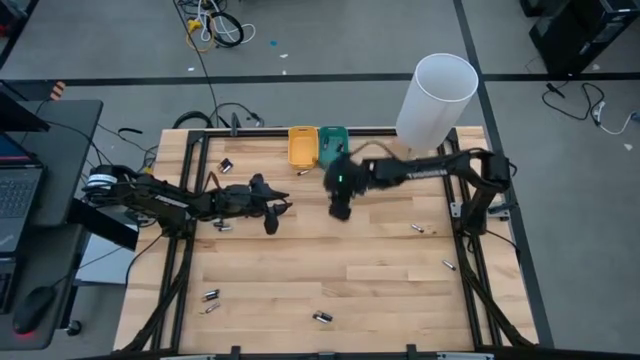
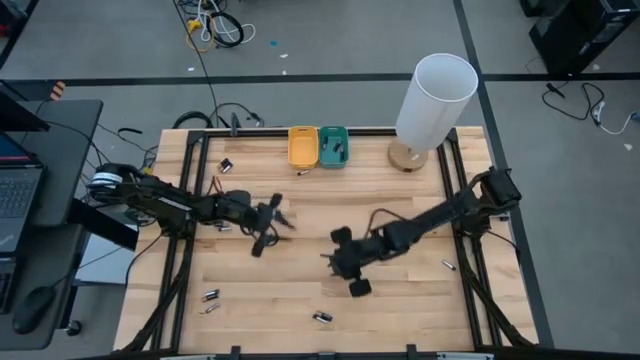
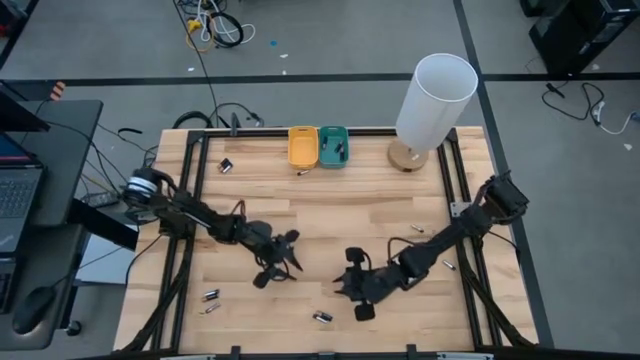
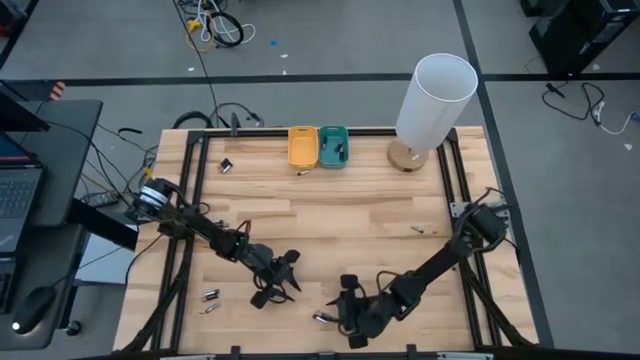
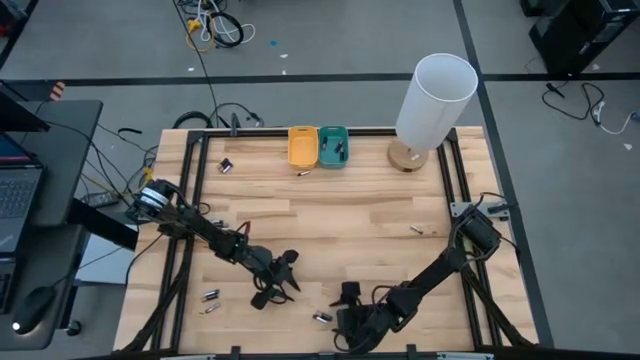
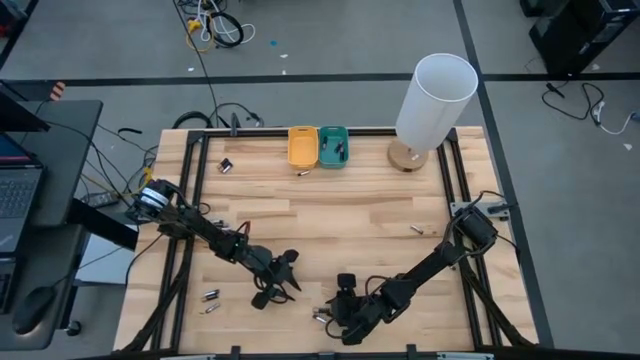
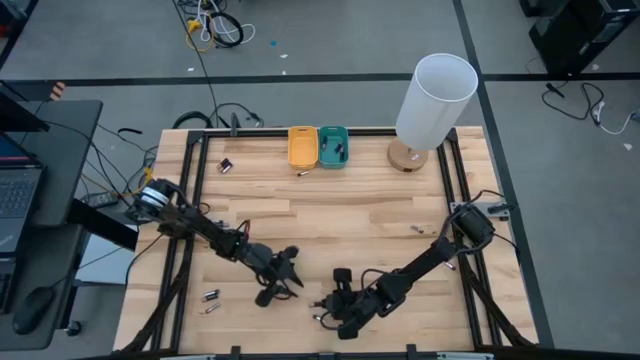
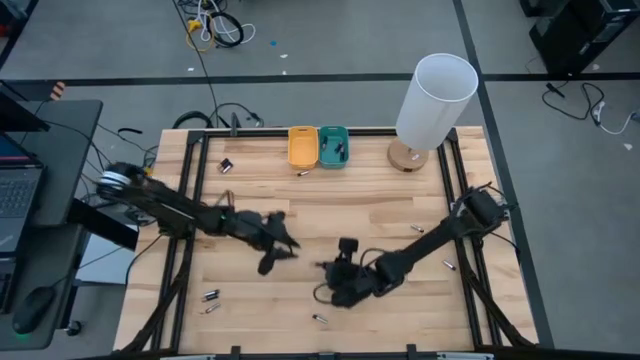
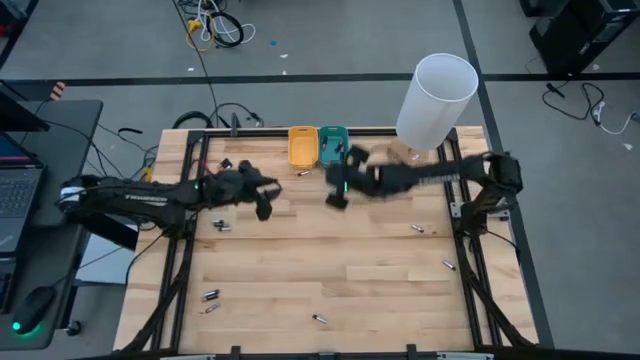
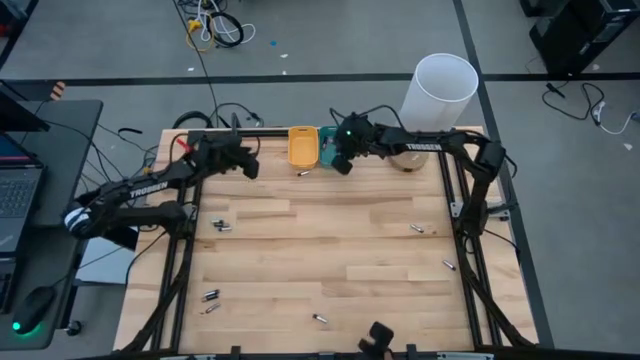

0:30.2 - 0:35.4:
Task: Sort batteries
Put the black battery into the green bin

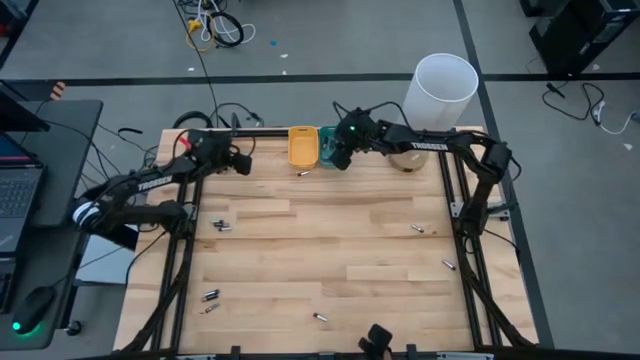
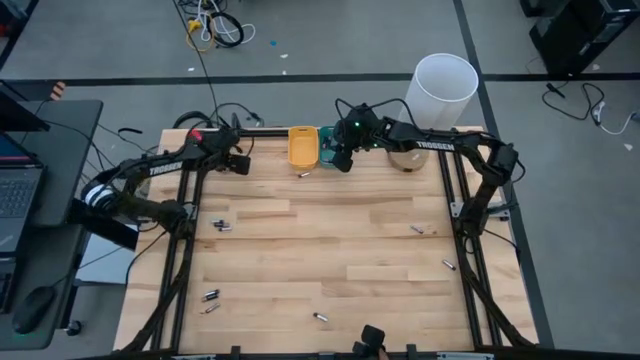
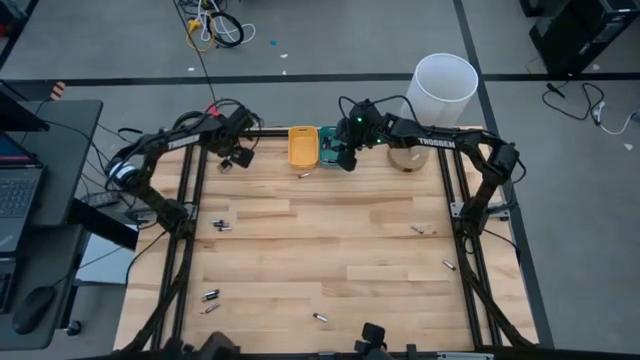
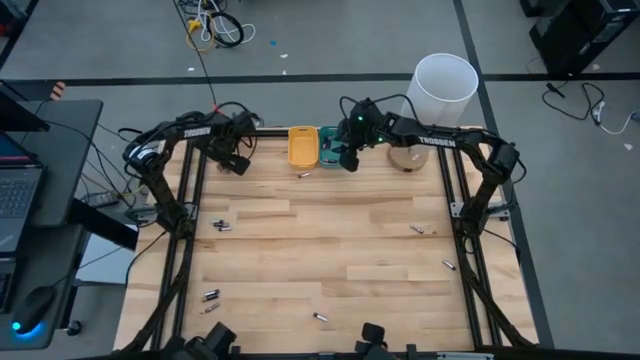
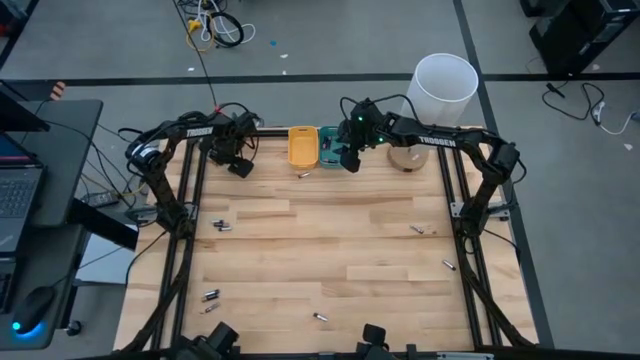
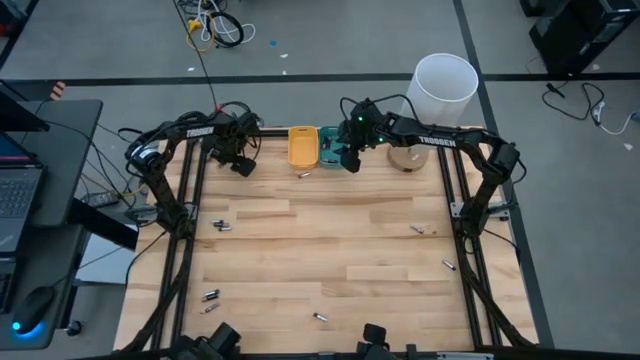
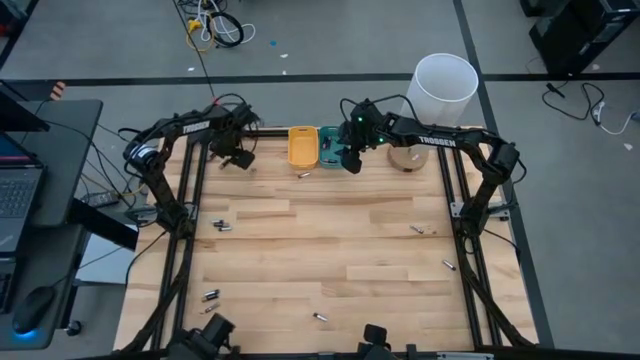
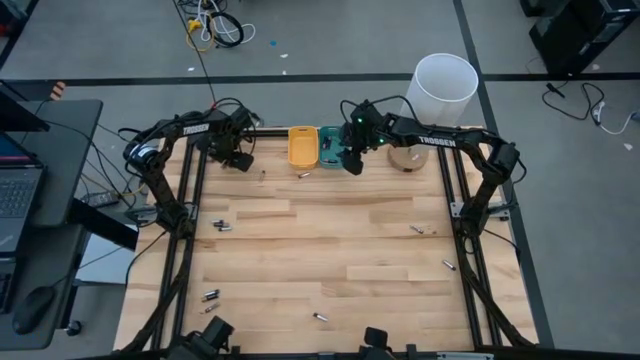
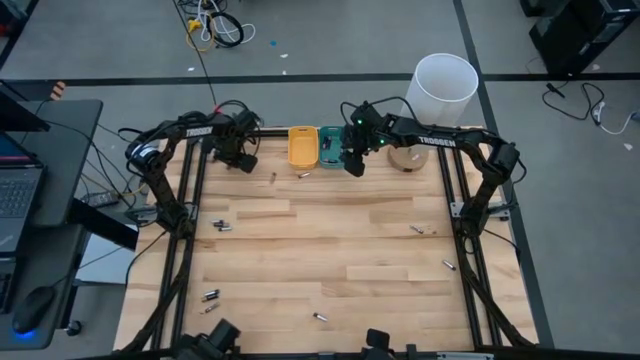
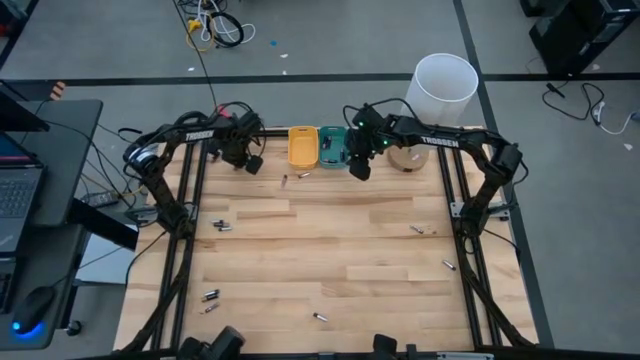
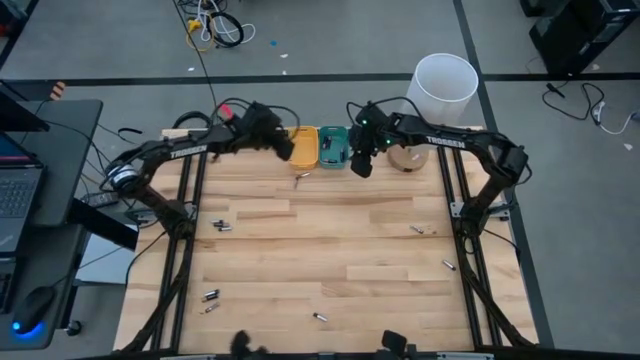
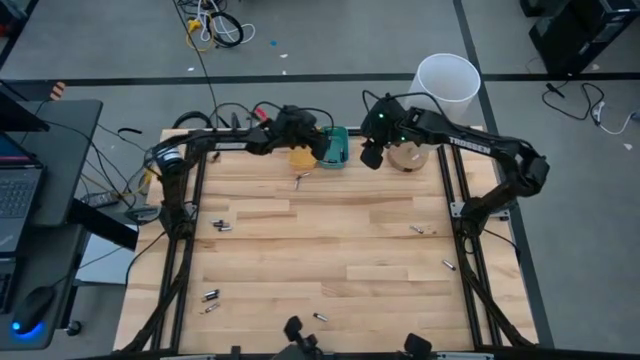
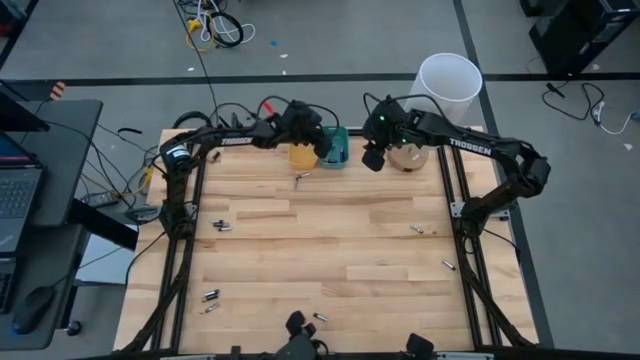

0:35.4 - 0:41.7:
Put the black battery into the green bin

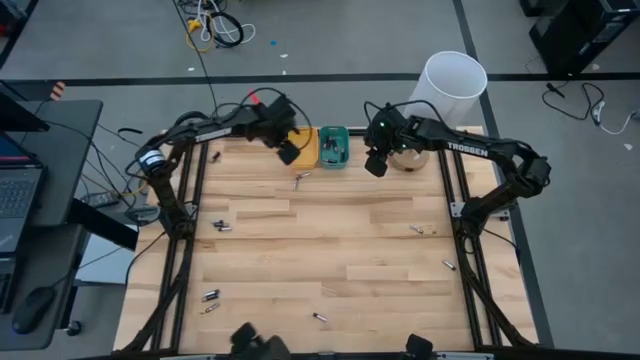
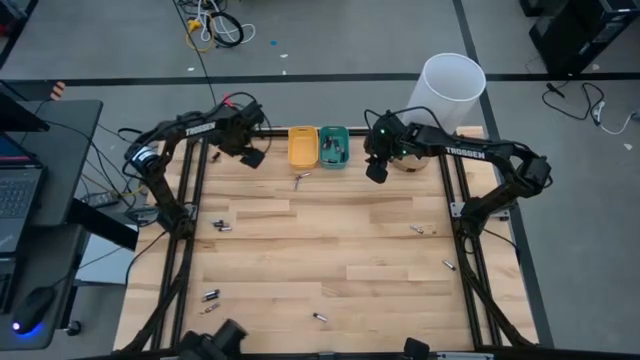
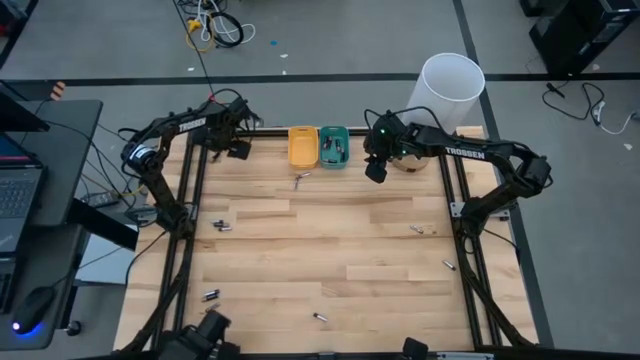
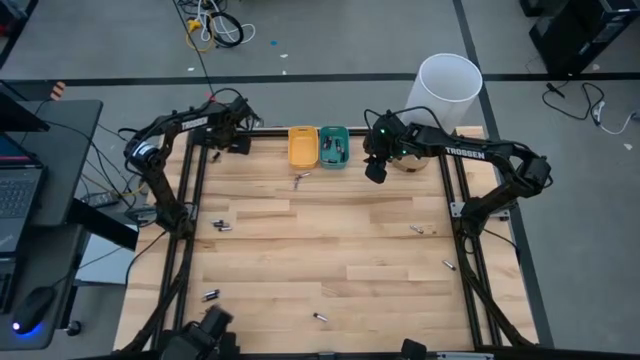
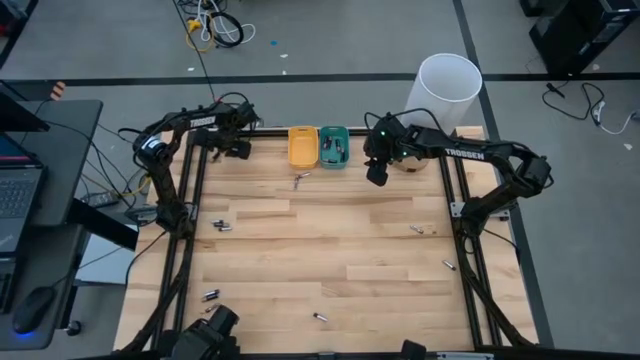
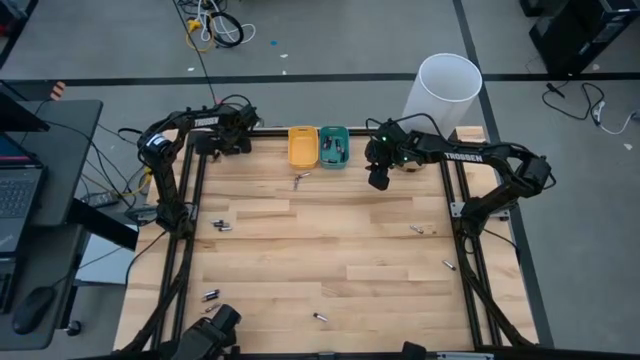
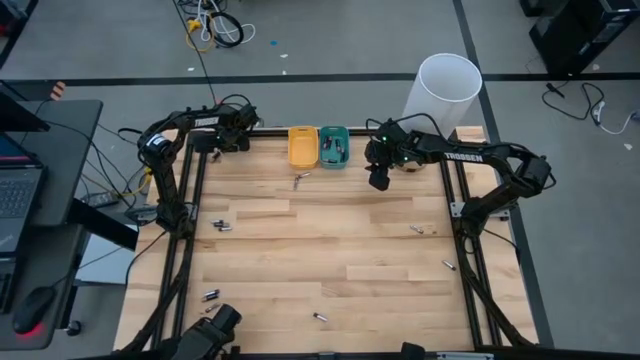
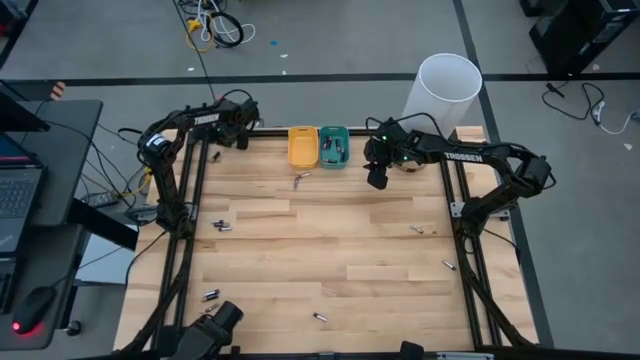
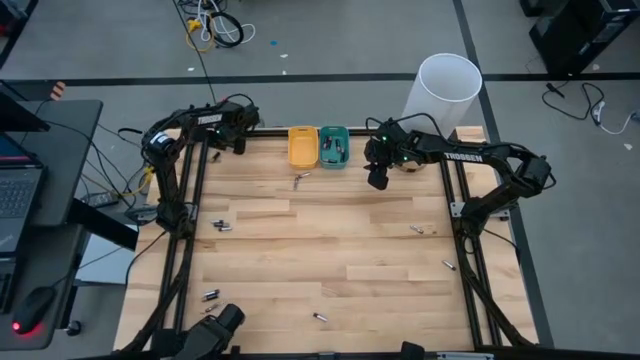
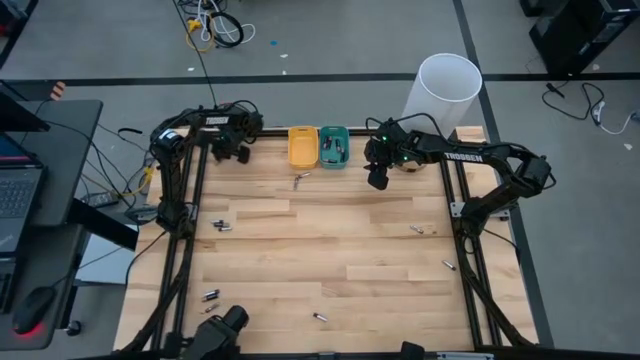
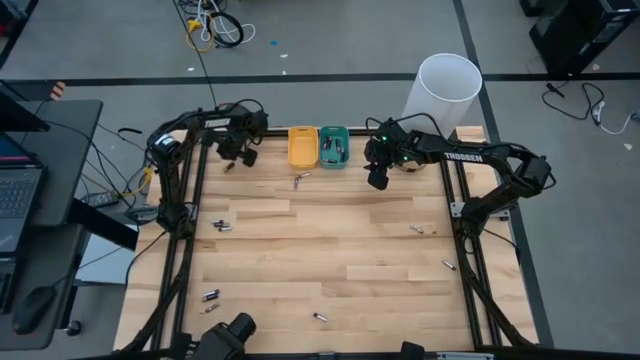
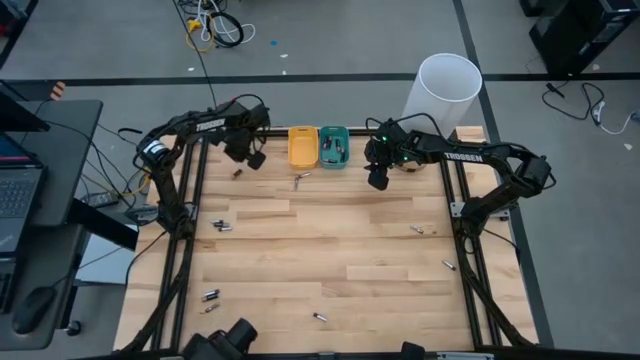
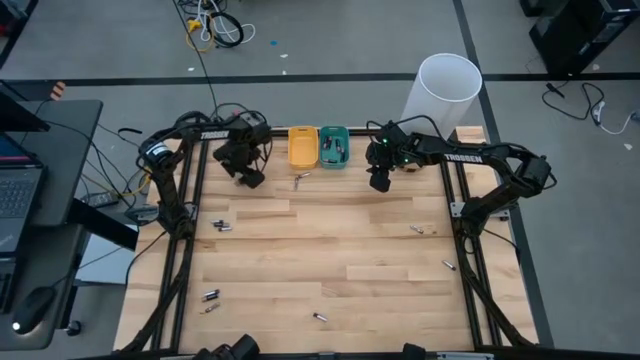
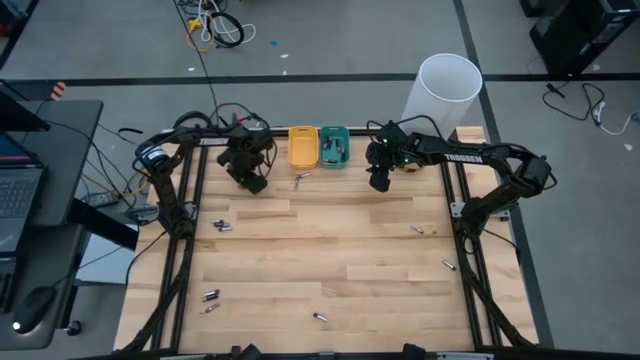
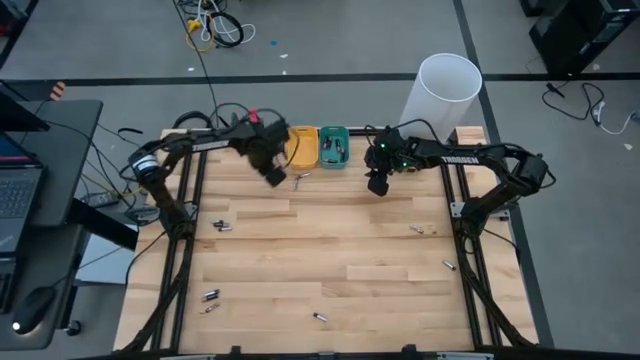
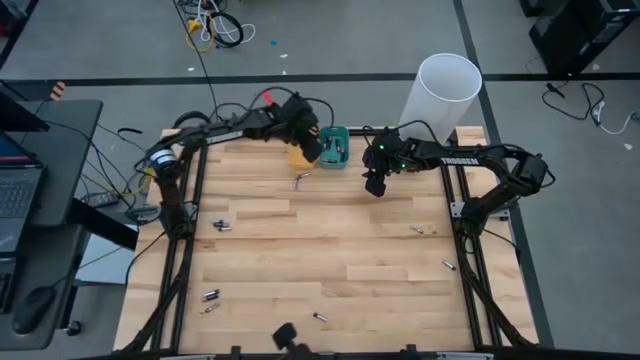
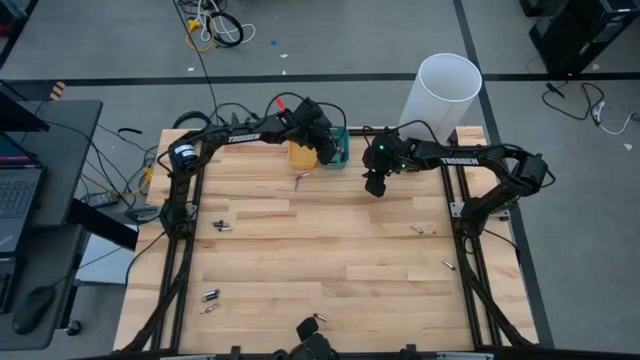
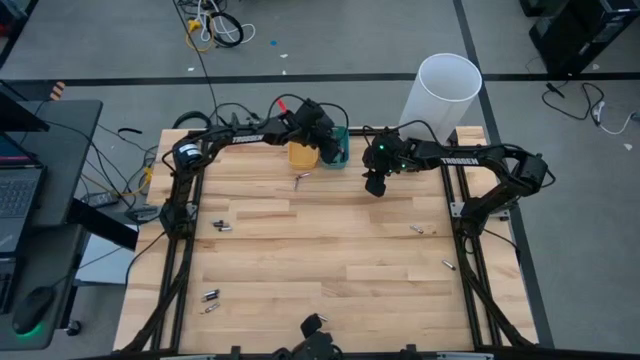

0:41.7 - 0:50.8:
Put the black battery into the green bin
